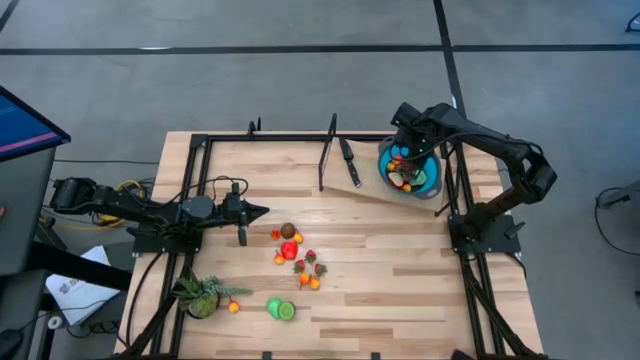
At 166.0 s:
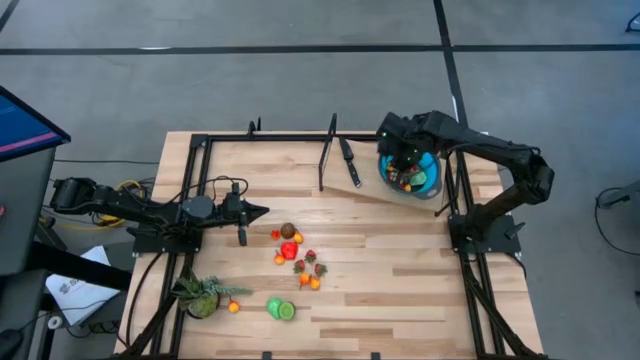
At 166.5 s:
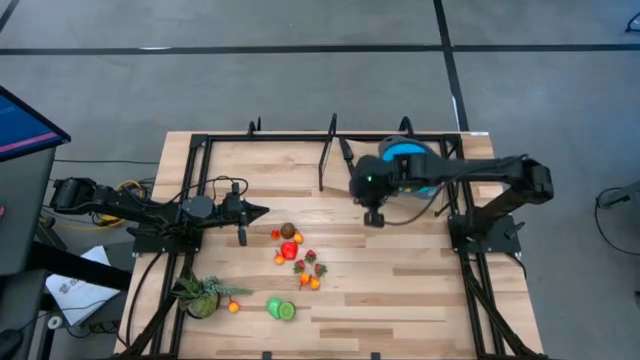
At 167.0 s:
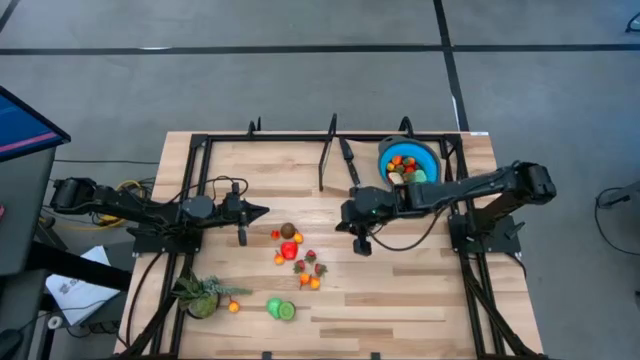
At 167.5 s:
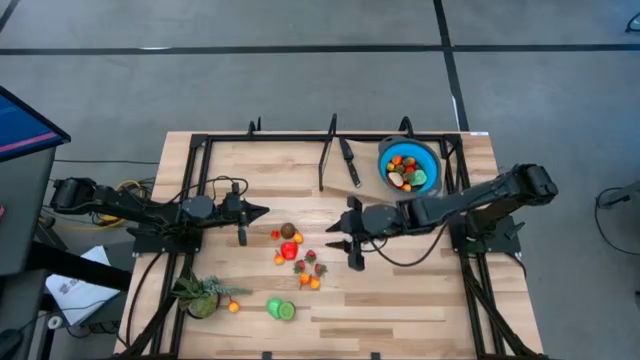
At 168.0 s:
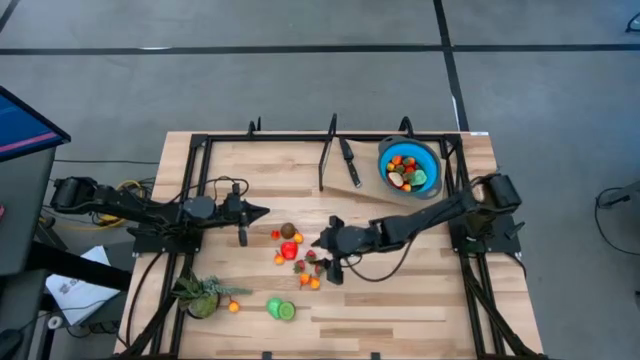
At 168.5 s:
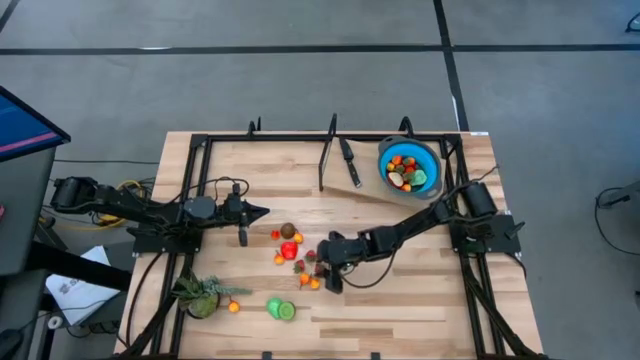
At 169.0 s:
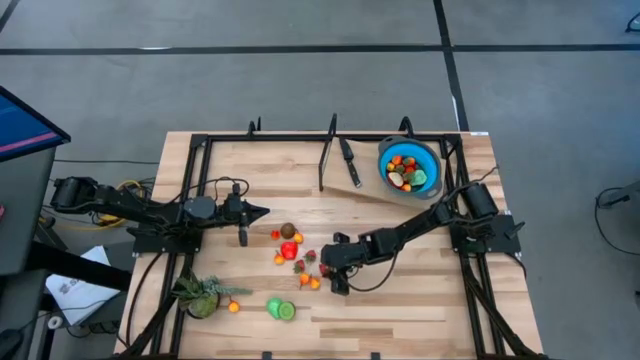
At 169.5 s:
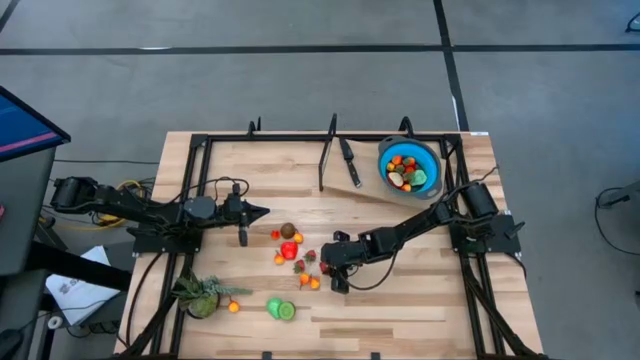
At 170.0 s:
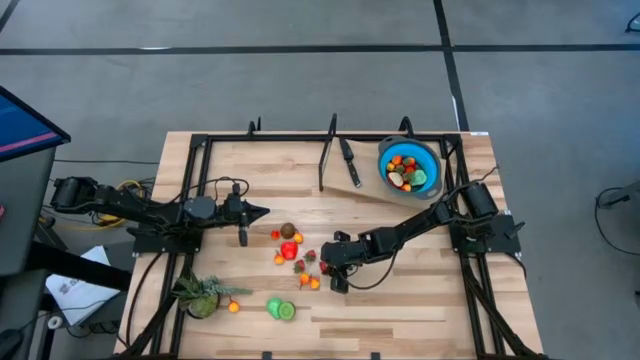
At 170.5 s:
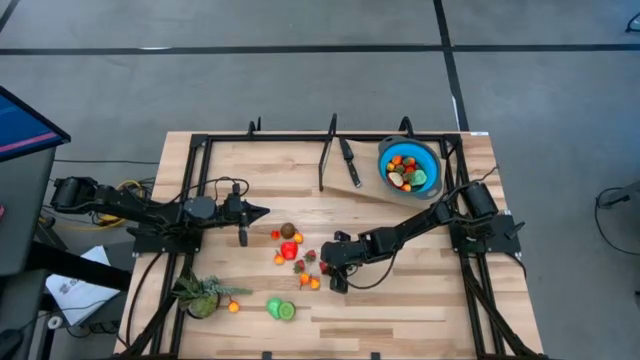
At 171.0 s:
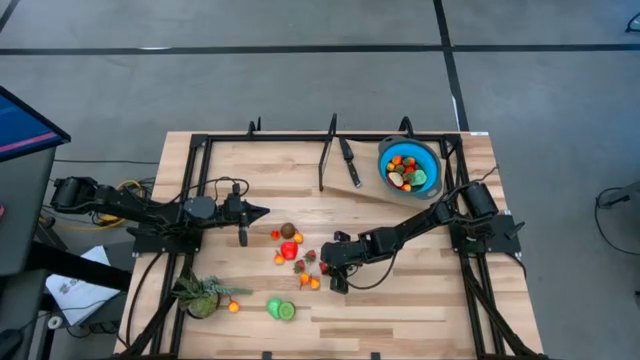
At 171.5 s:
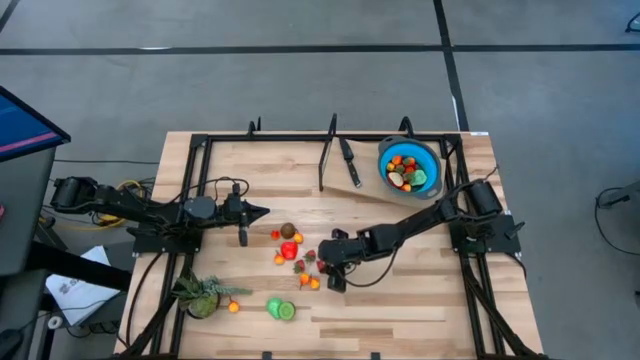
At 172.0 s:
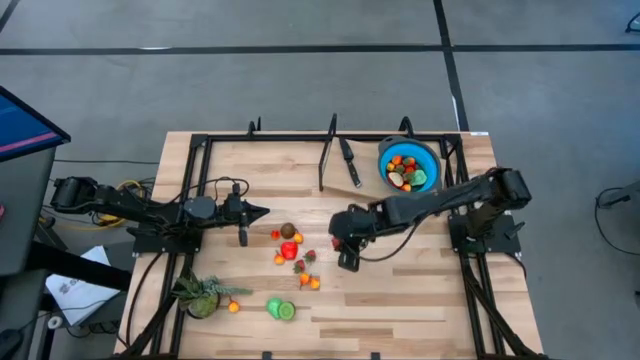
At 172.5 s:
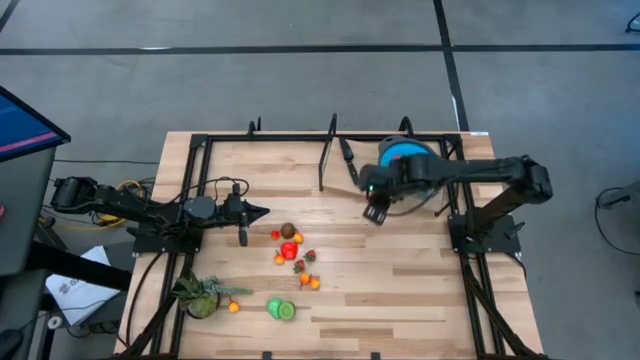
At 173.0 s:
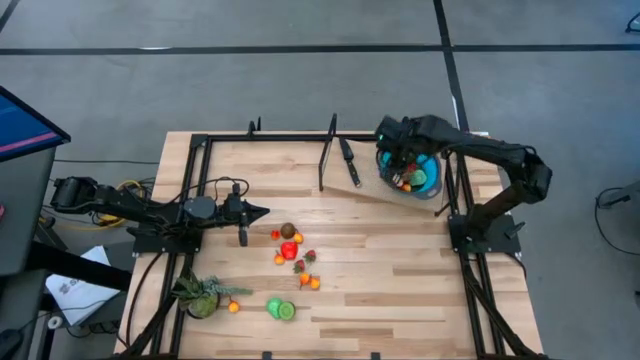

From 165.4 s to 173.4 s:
Task: Pick & Place Fruit
Put the red strawberry into the blue colander

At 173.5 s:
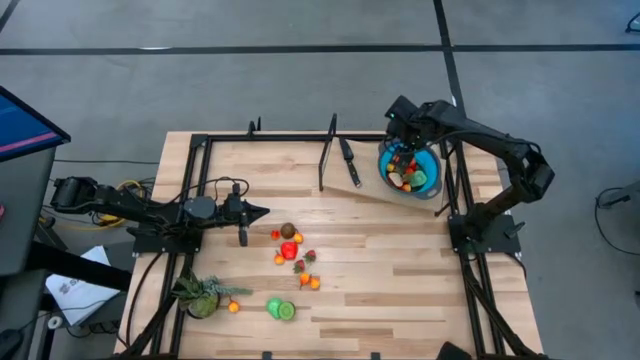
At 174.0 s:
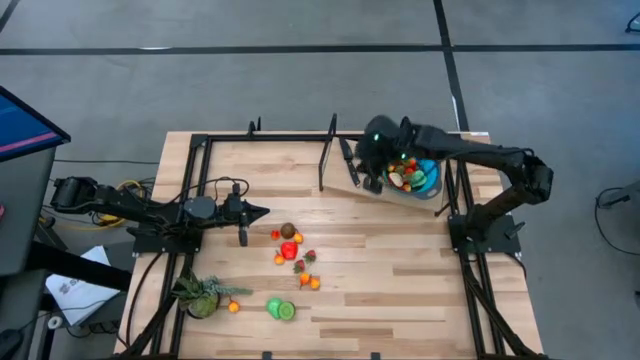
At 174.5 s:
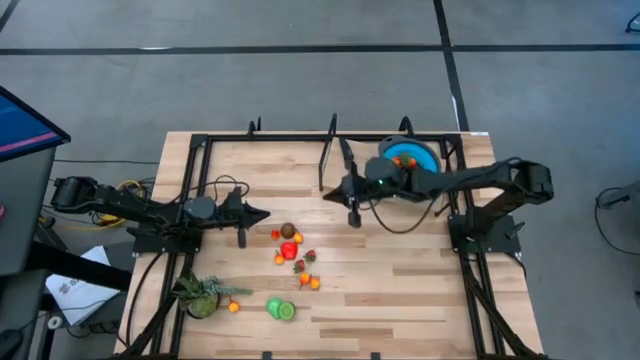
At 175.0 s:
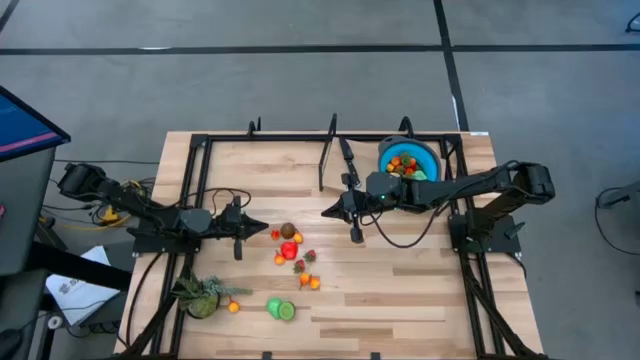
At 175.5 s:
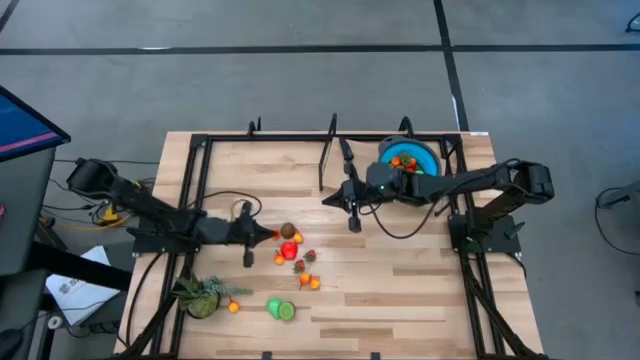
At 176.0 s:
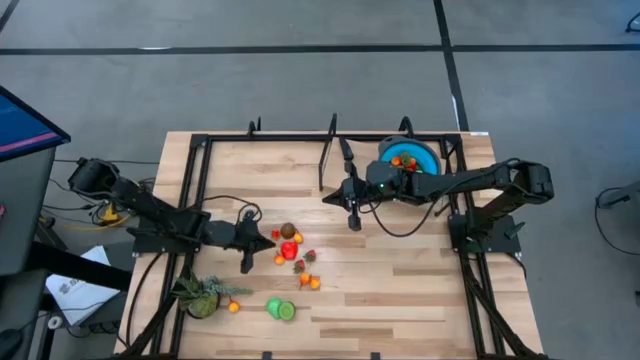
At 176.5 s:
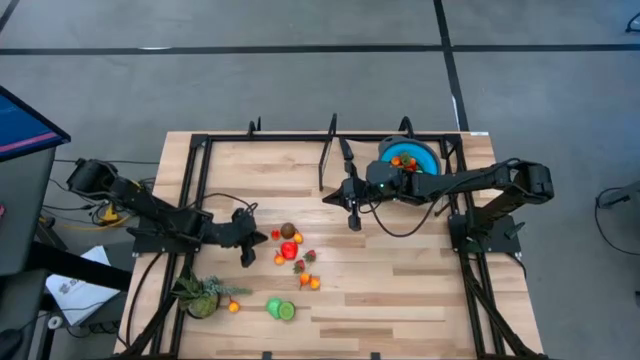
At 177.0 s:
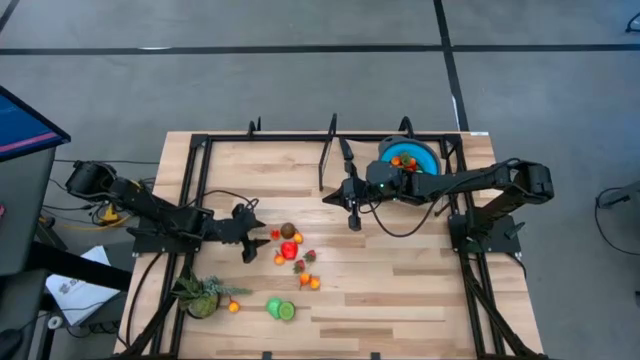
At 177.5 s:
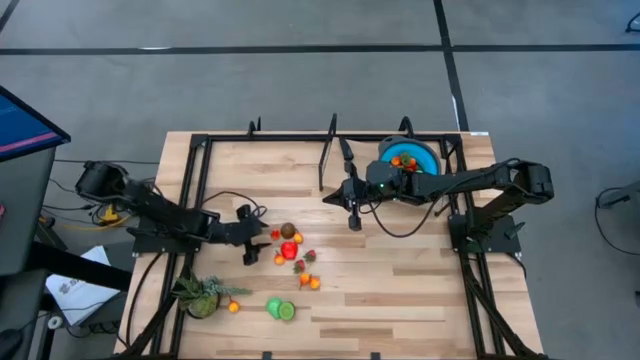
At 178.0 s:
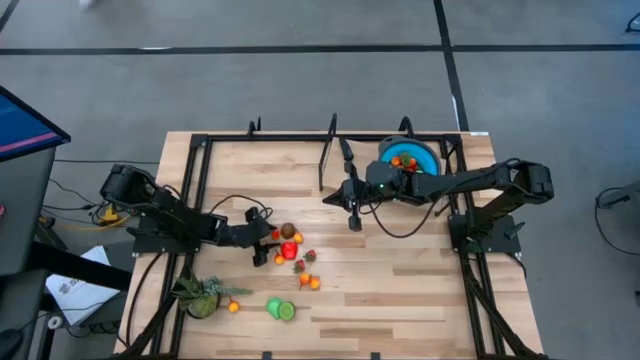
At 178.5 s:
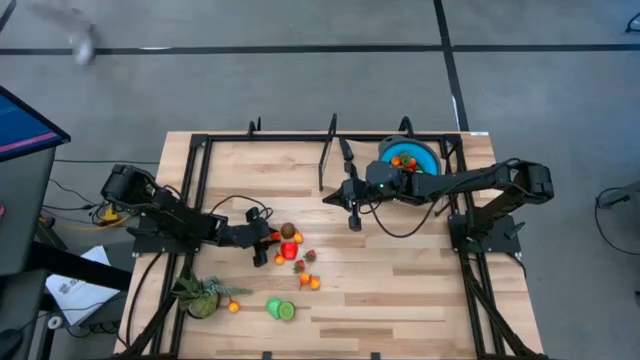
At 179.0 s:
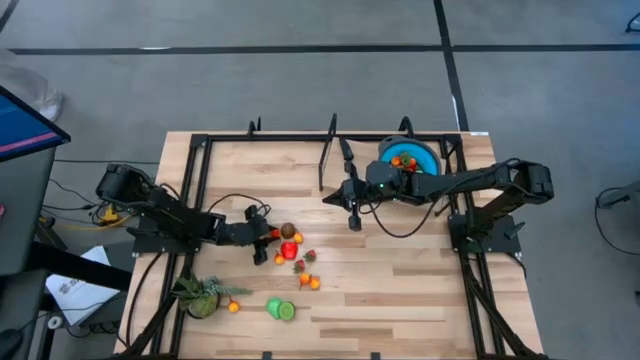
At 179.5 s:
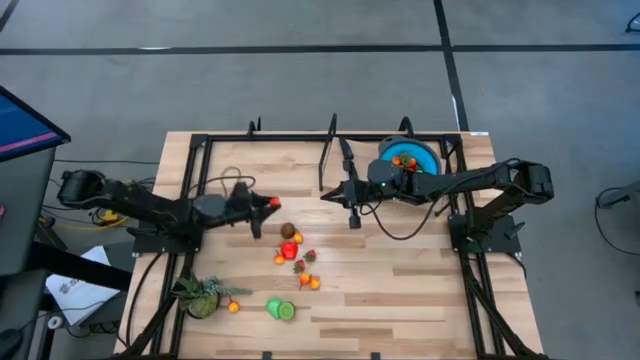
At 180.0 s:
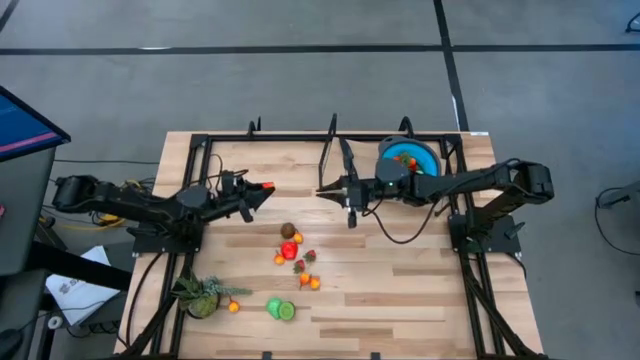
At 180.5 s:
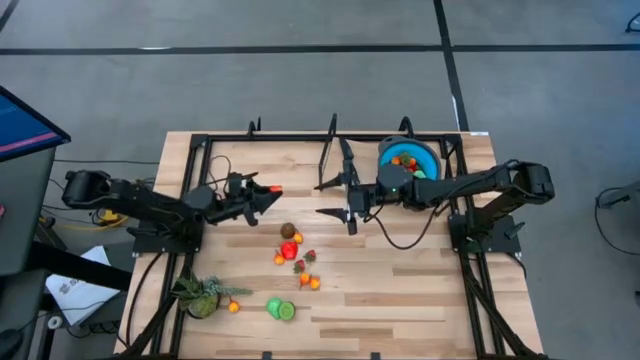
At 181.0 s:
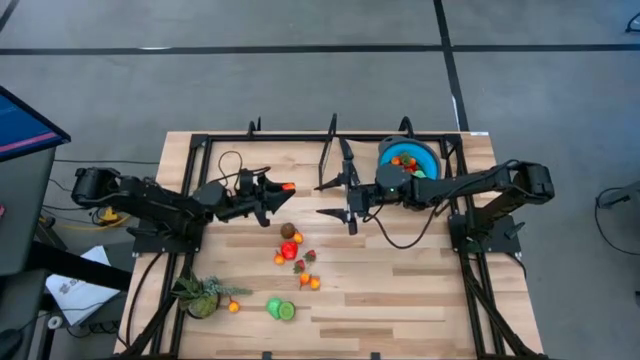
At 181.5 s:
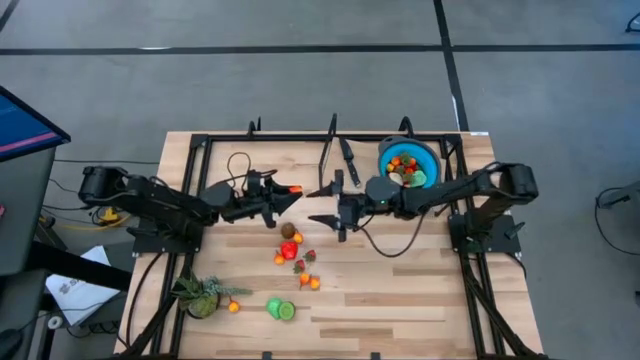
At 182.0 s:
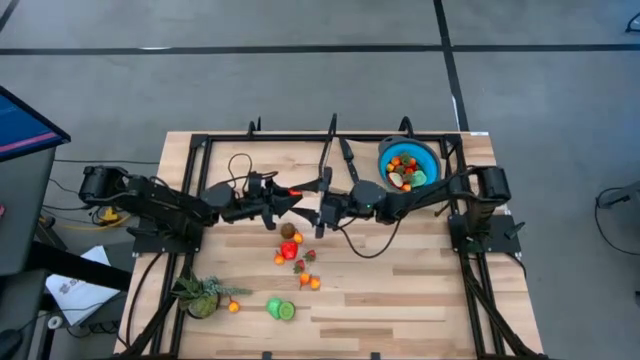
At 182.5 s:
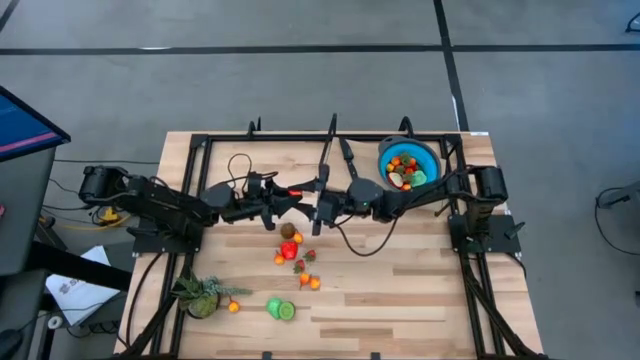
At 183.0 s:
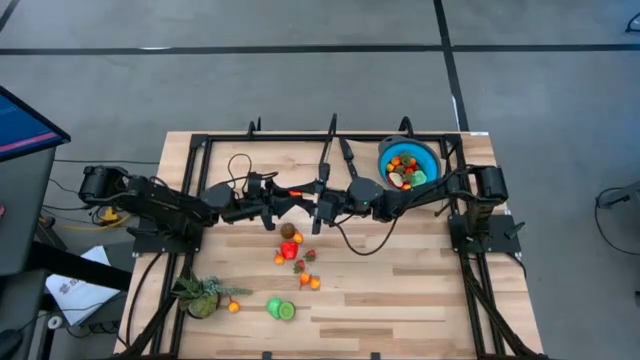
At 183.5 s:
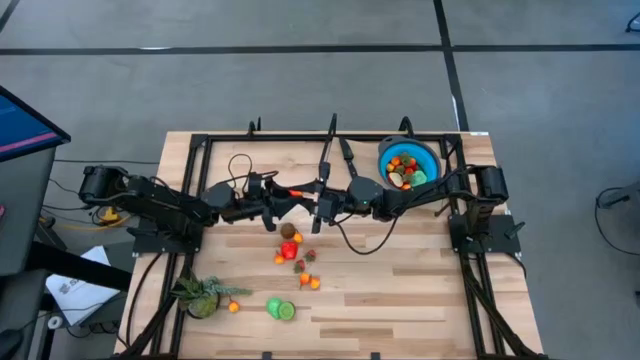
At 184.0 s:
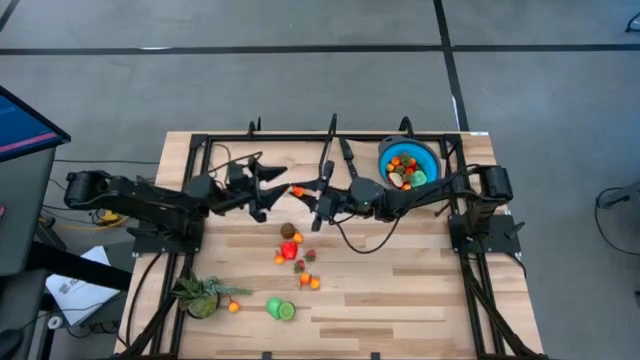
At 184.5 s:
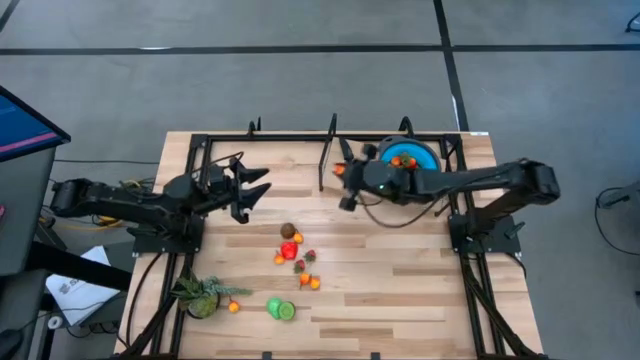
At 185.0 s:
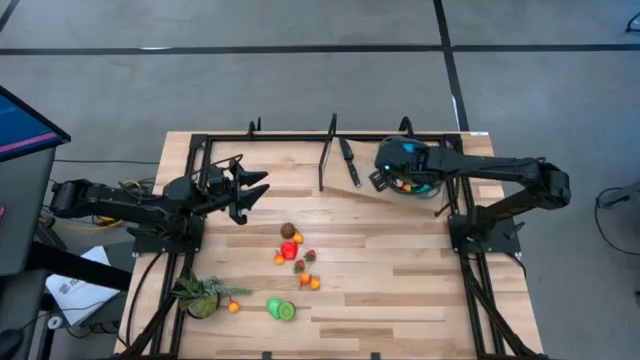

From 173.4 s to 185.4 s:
Put the orange pear into the blue colander

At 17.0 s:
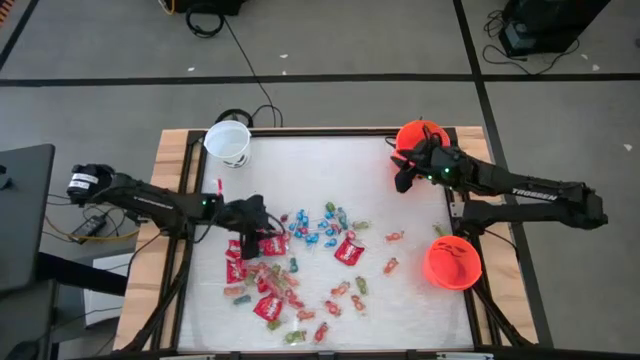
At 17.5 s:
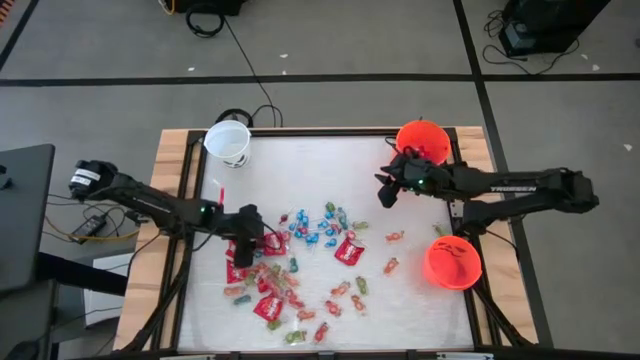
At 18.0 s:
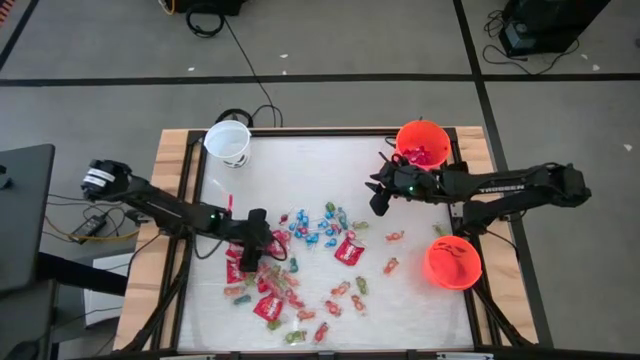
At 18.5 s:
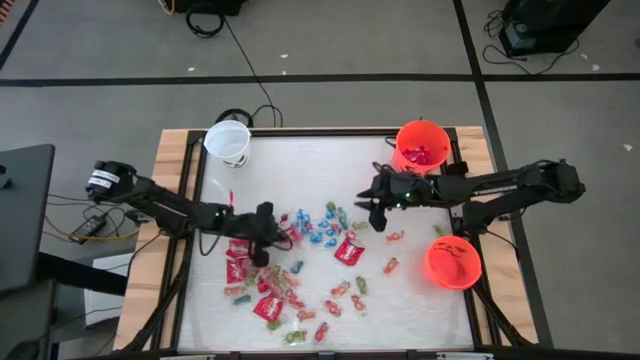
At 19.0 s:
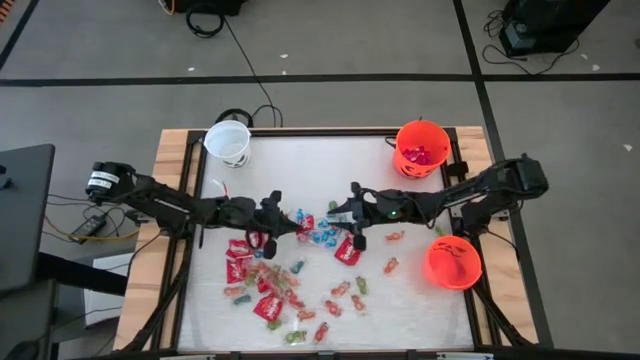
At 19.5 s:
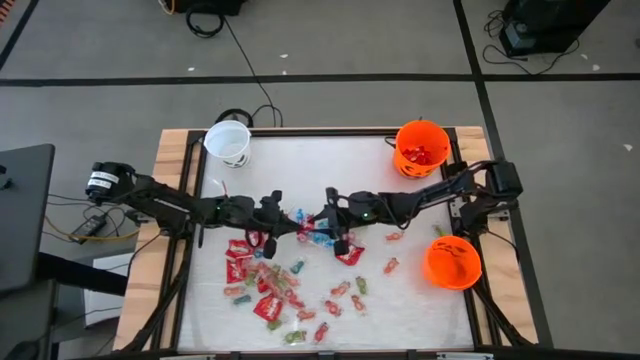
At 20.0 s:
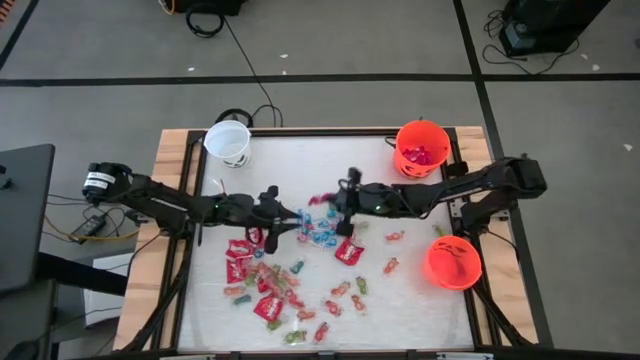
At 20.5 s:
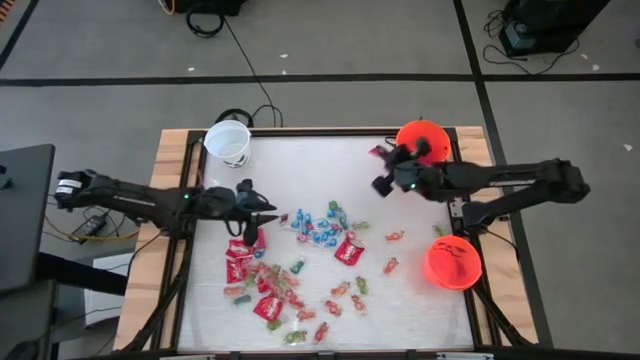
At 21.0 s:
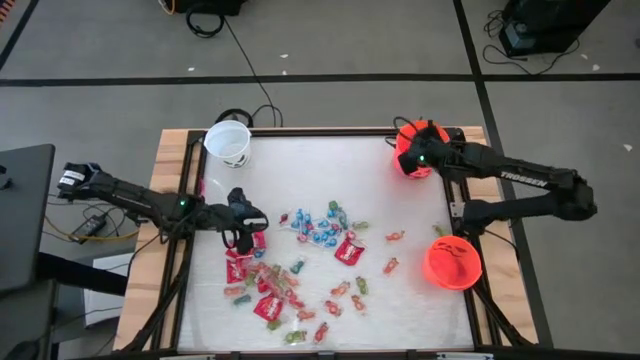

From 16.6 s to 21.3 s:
Task: Sort candy by brand, put in halloween buckets
Put the red candy into the top orange bucket
